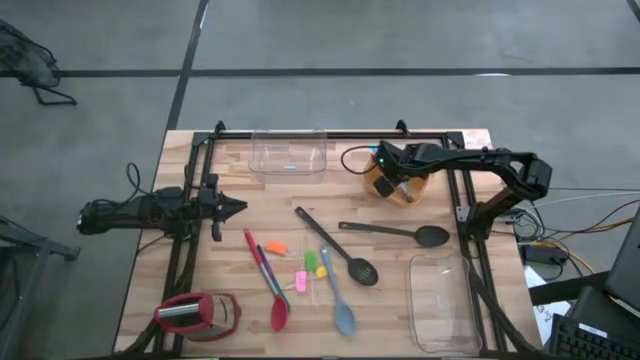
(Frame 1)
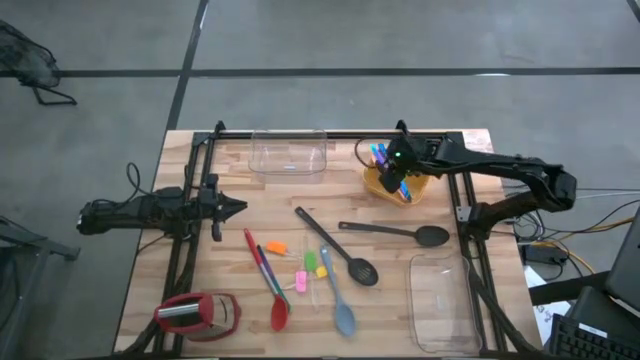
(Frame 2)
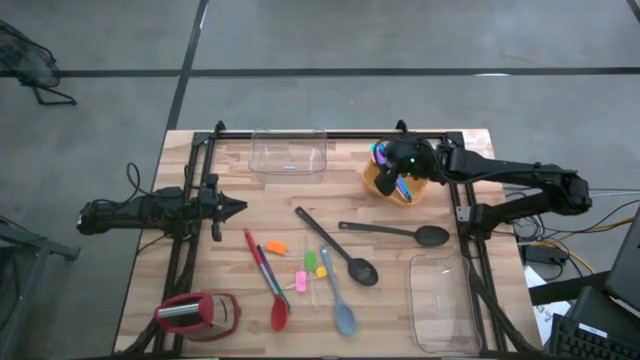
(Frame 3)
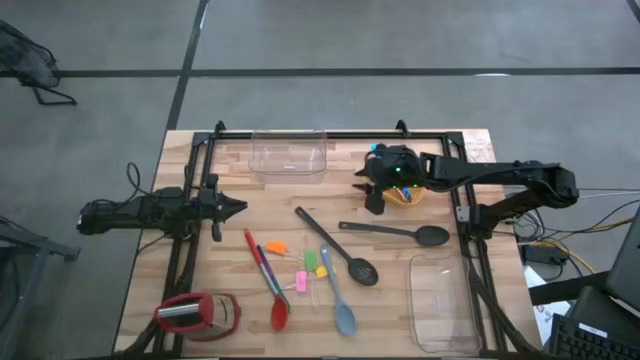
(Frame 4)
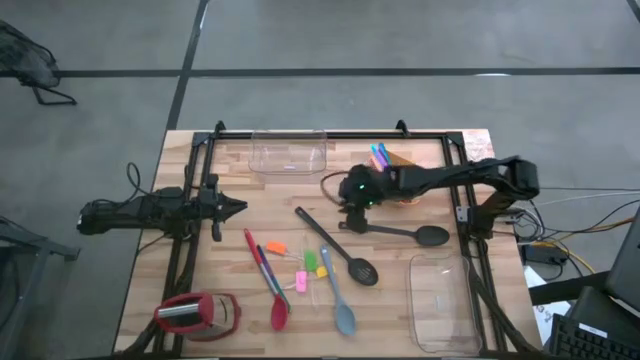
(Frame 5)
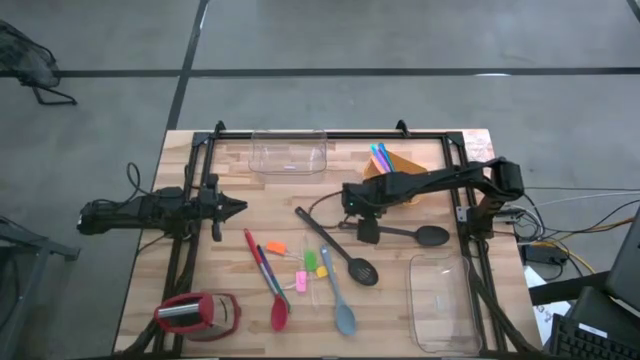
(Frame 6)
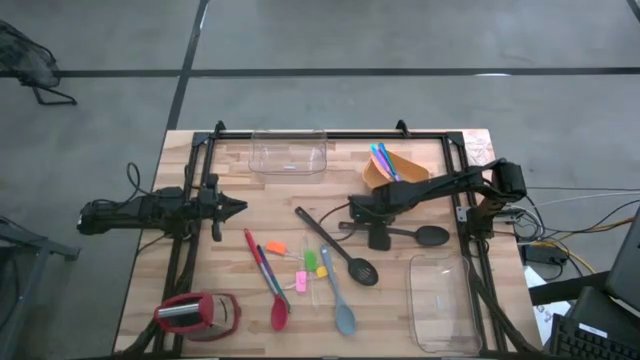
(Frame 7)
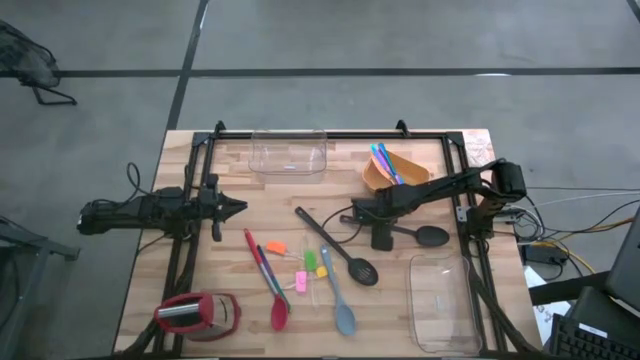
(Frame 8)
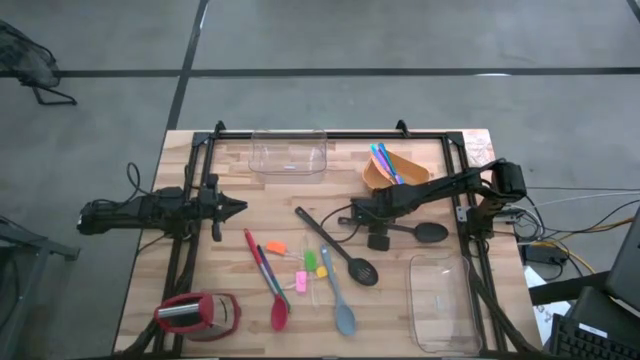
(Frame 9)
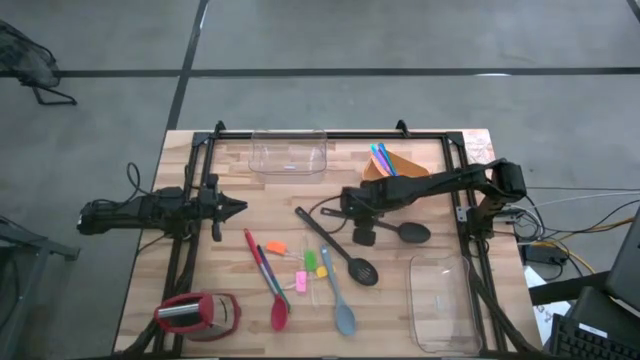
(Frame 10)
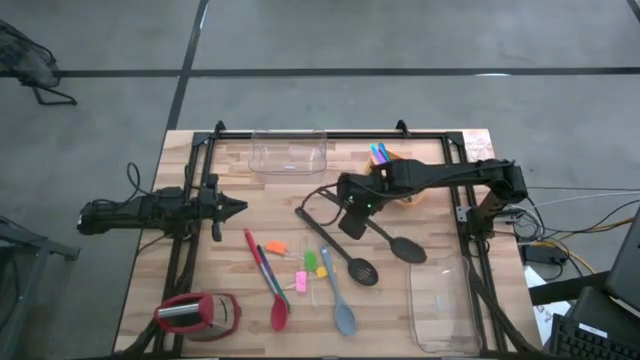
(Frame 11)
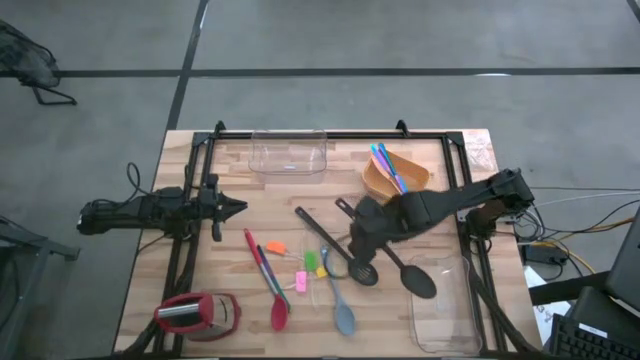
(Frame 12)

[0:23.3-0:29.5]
Task: Pick & Place Kitchen Items
Put the black serving spoon into the bottom transparent bin

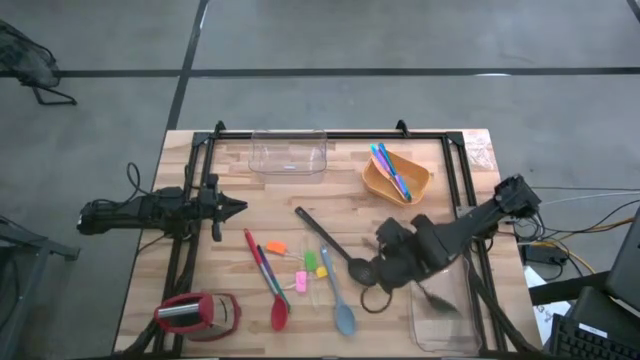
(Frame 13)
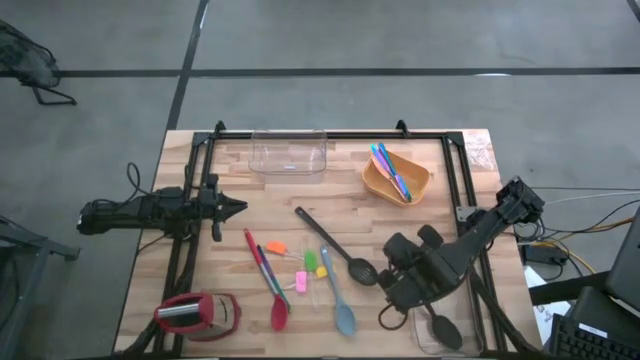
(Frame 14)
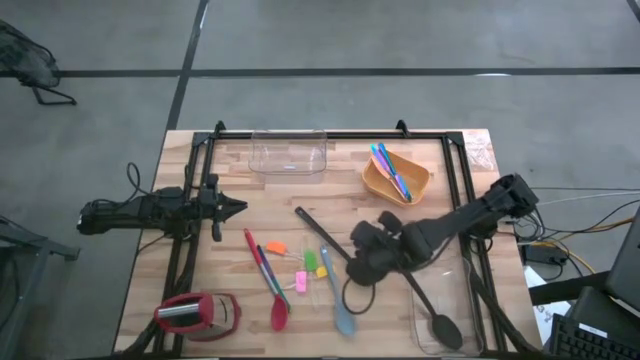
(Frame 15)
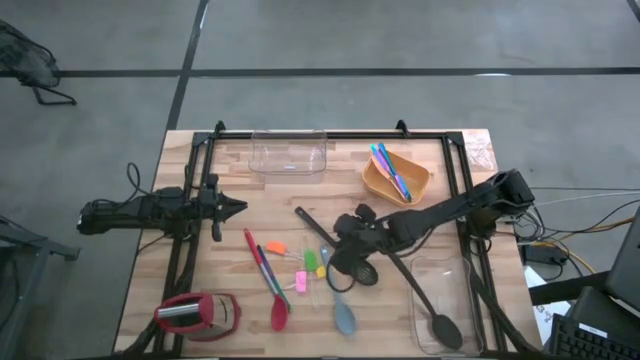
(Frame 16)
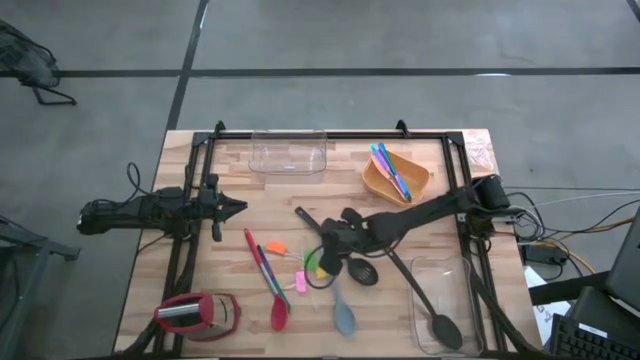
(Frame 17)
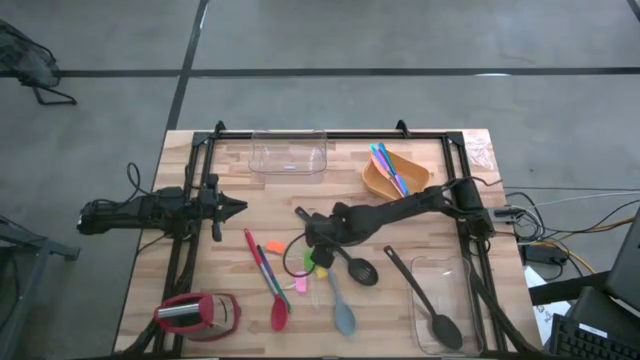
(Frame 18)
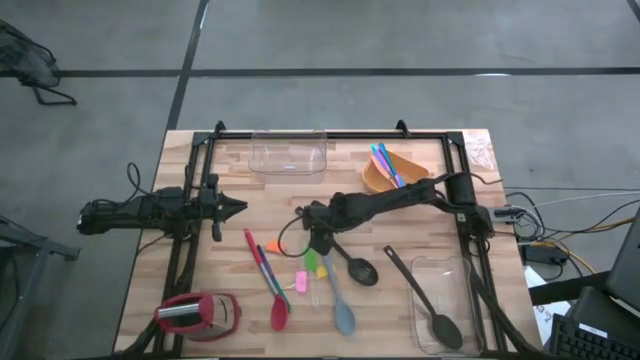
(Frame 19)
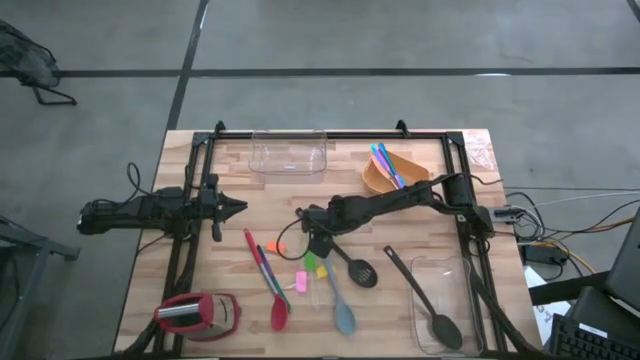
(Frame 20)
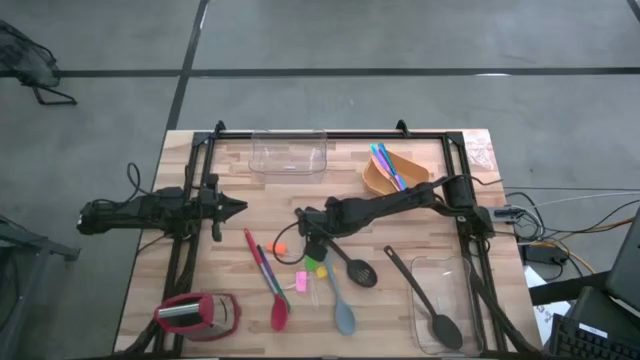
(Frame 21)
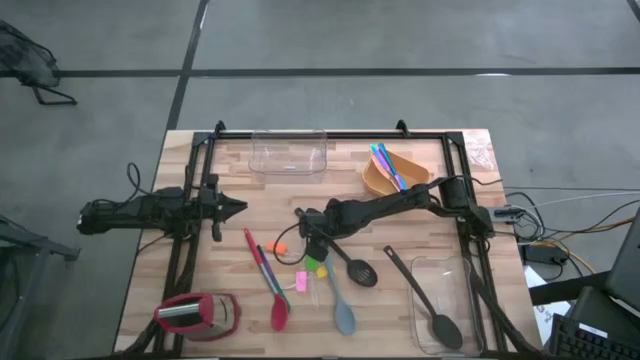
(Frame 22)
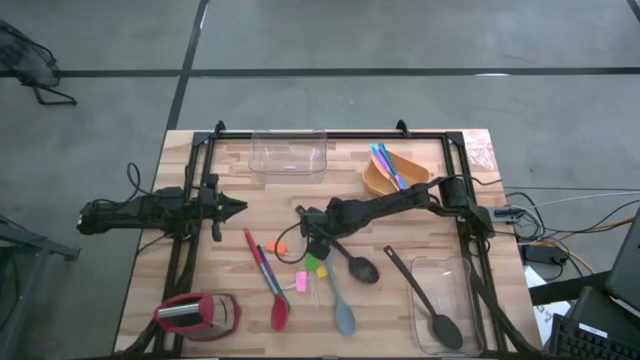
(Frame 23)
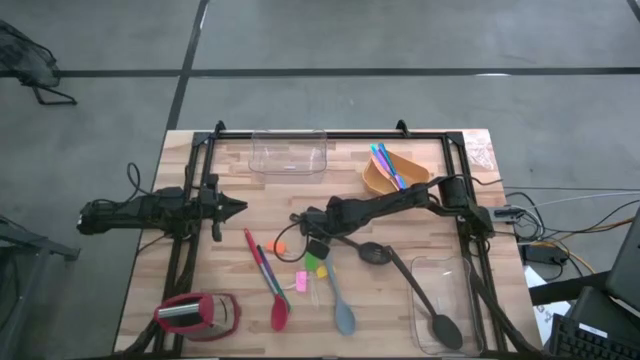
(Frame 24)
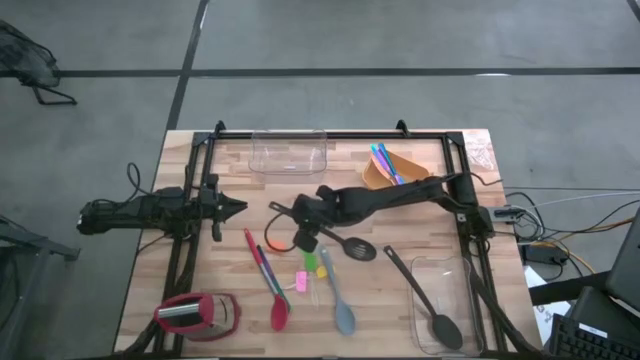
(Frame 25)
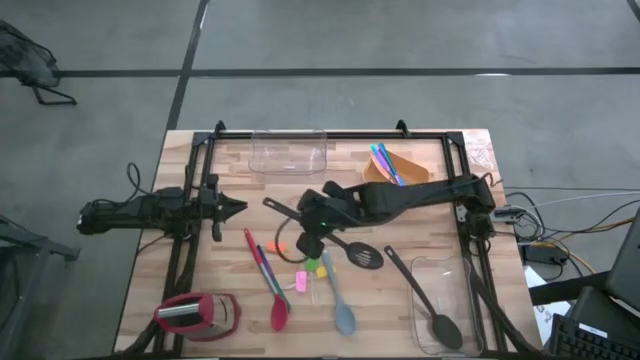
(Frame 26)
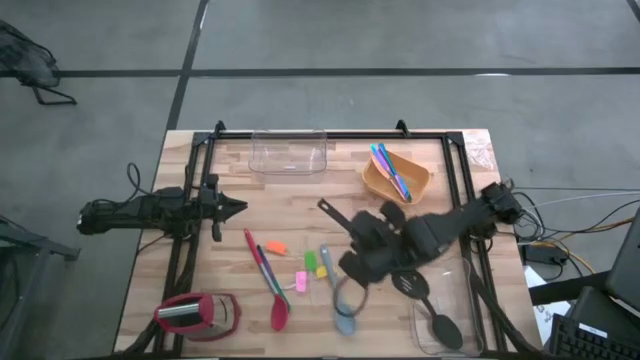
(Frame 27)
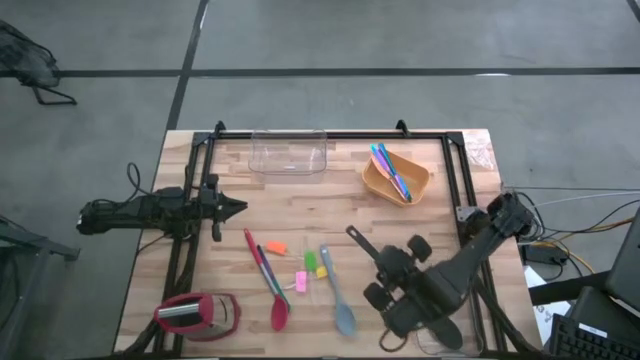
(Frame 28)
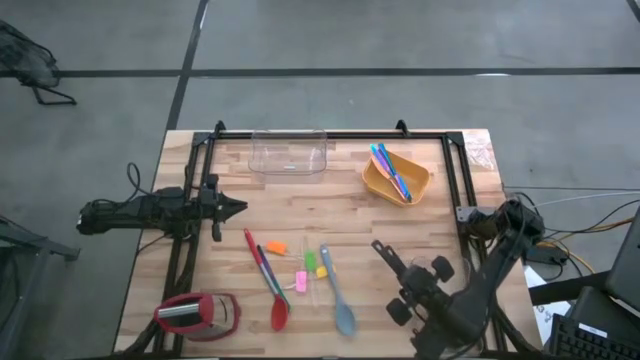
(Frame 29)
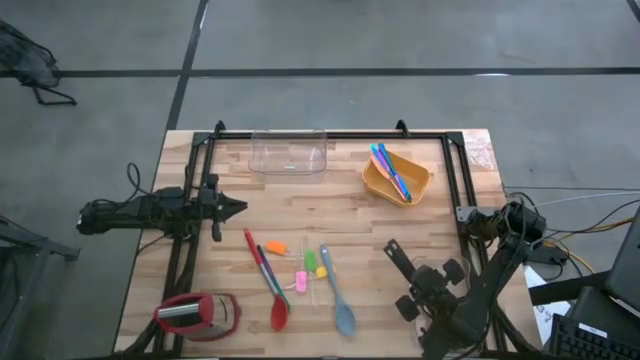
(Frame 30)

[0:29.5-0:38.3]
Put the black serving spoon into the bottom transparent bin

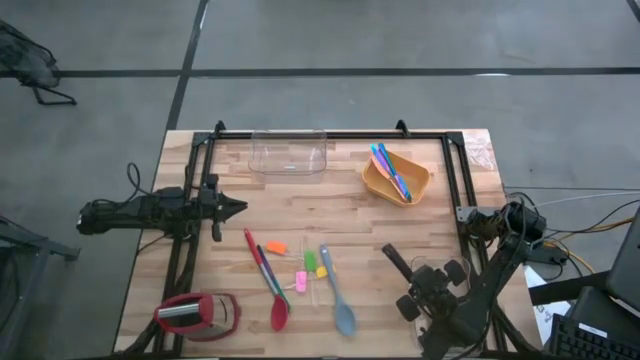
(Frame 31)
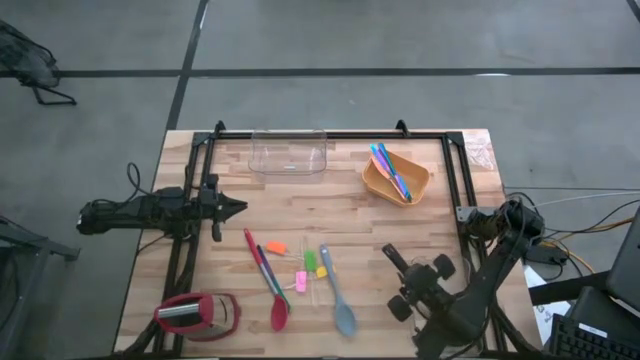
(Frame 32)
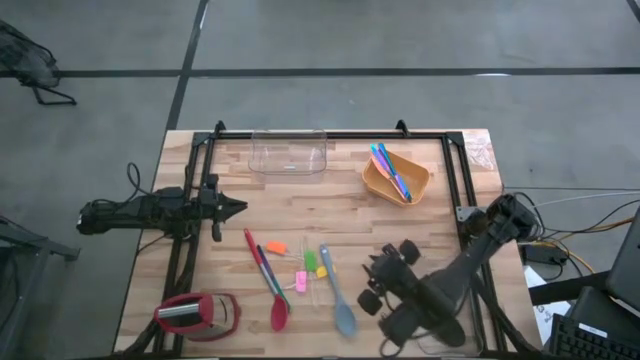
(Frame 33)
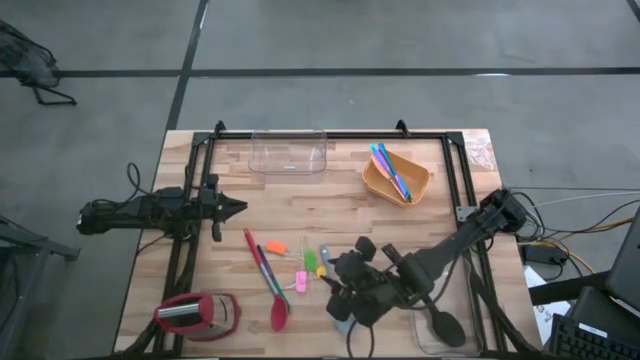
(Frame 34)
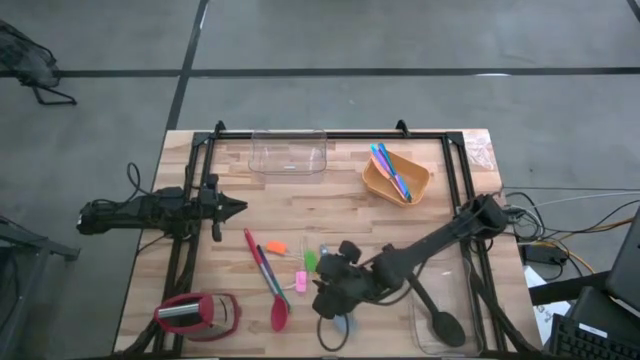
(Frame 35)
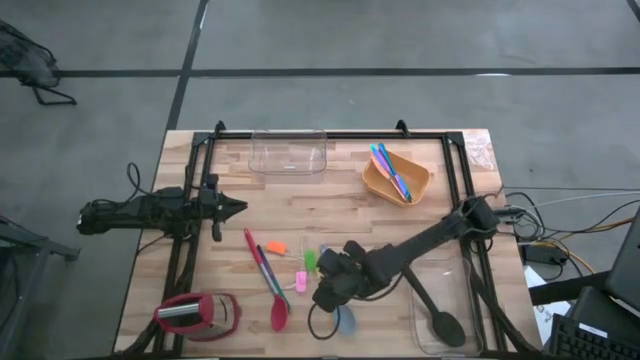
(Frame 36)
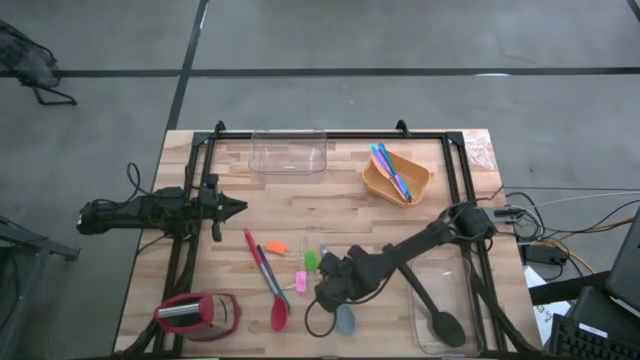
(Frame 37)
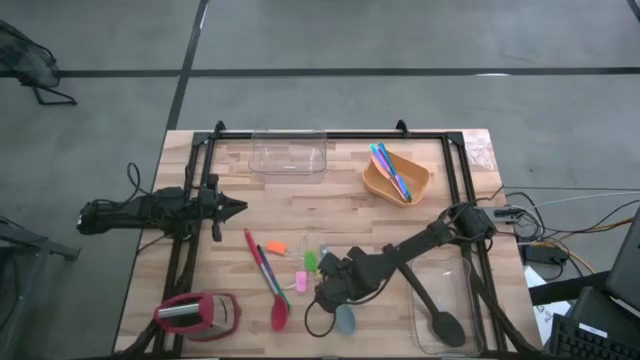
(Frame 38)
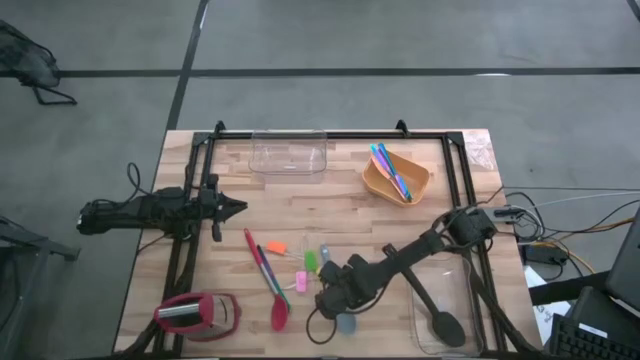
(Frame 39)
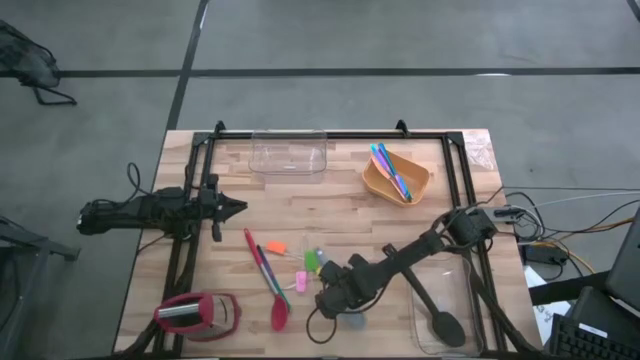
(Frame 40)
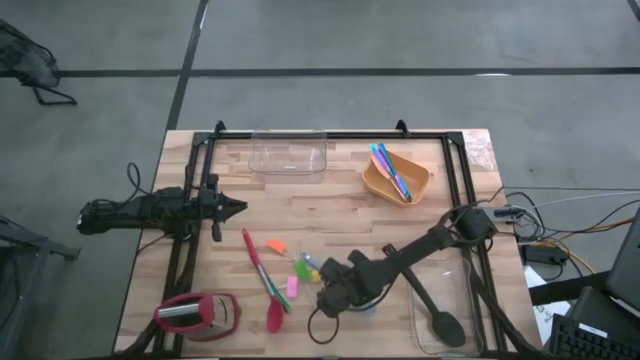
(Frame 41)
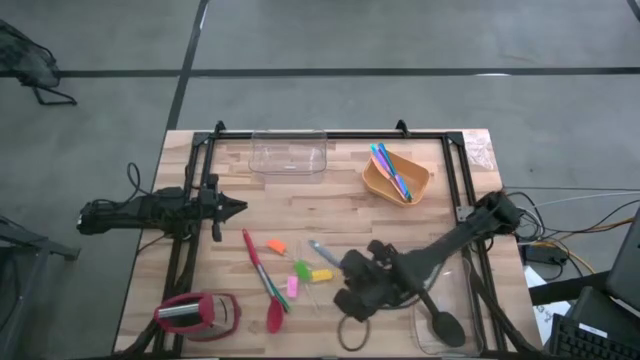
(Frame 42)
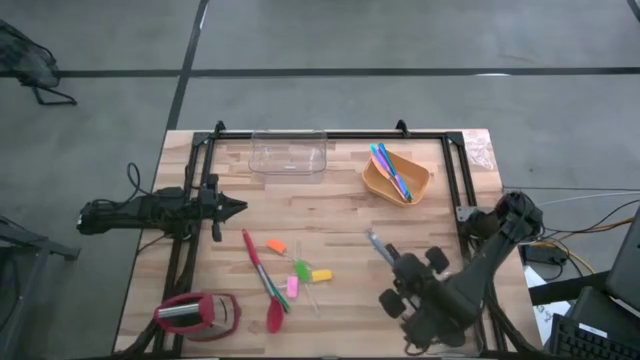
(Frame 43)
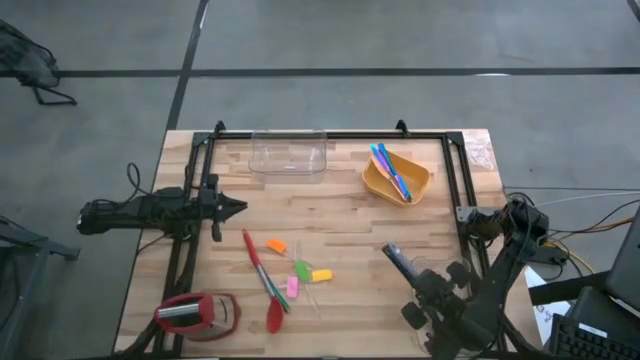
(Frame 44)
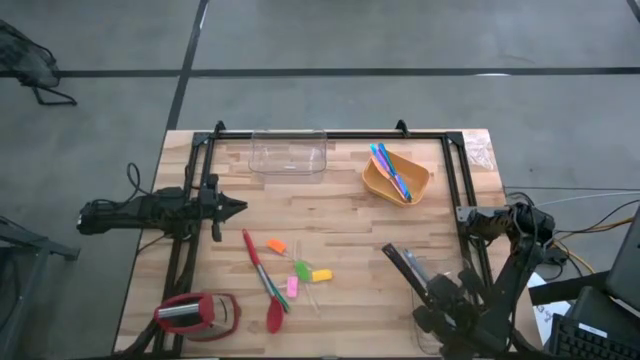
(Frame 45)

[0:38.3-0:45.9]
Put the gray serving spoon into the bottom transparent bin
